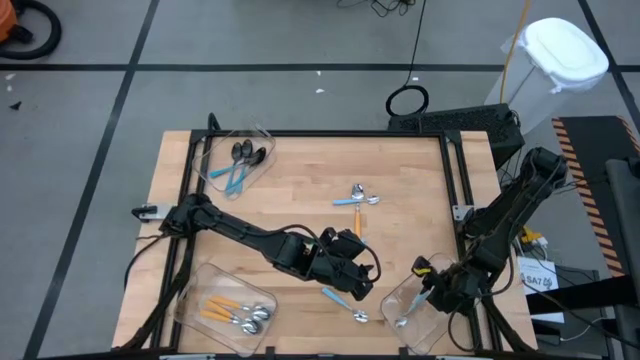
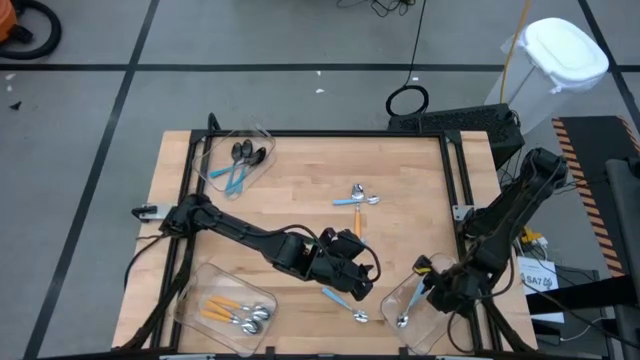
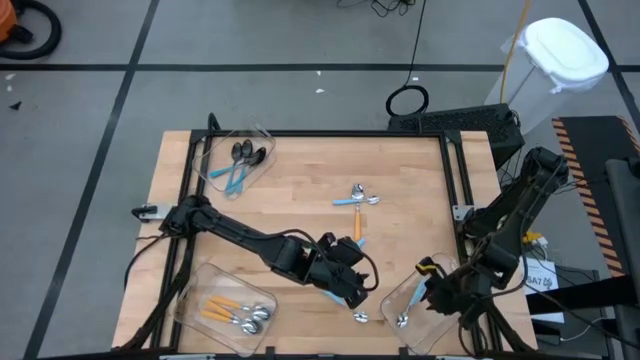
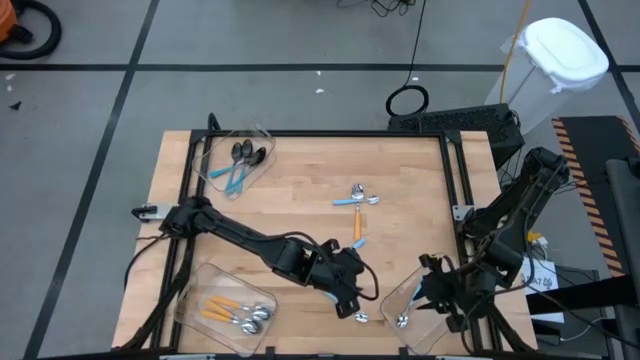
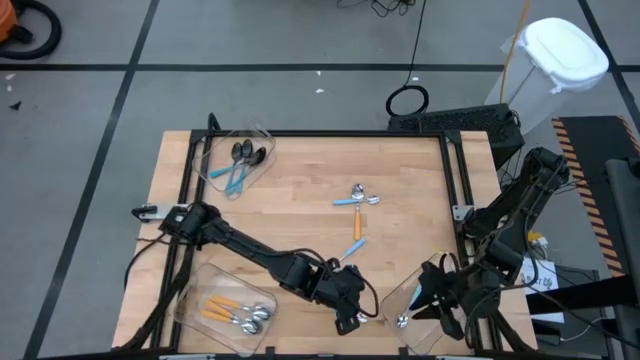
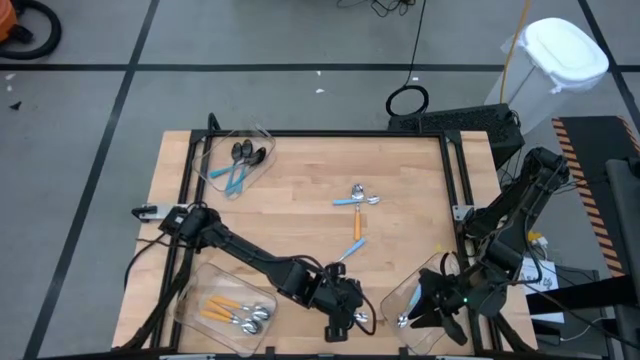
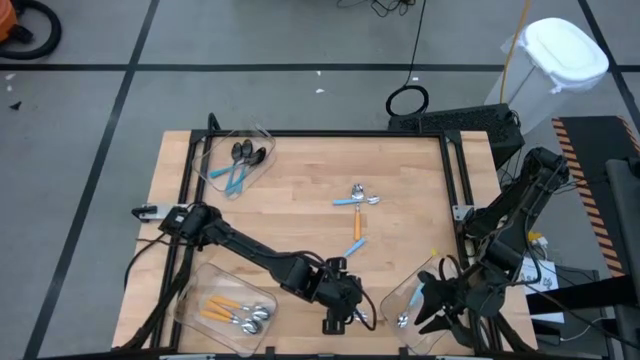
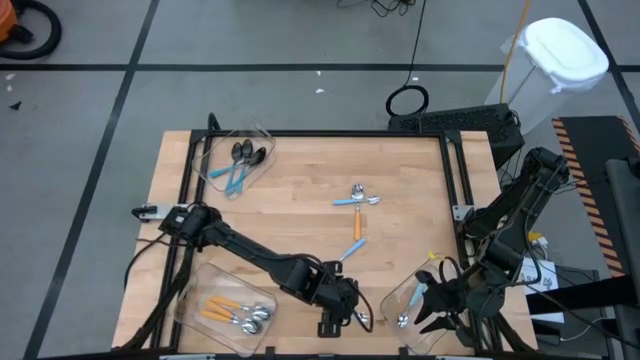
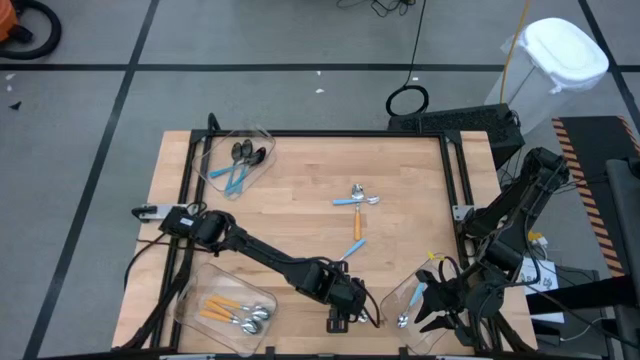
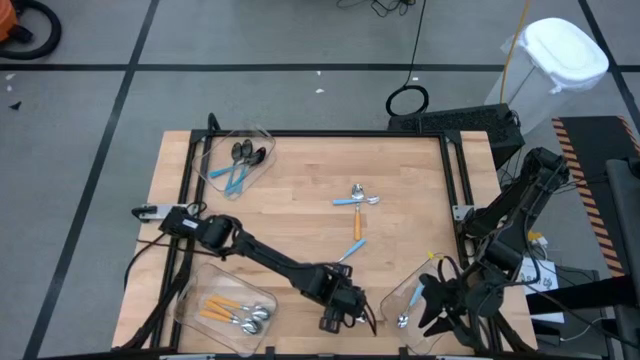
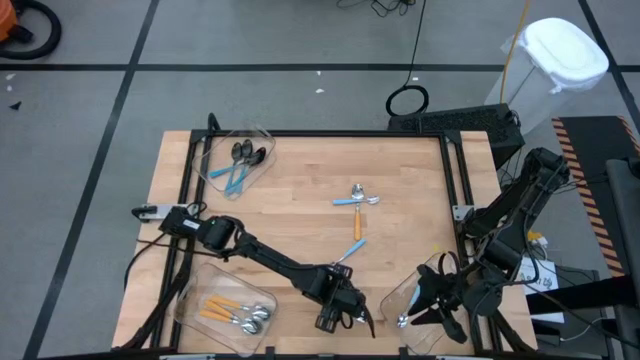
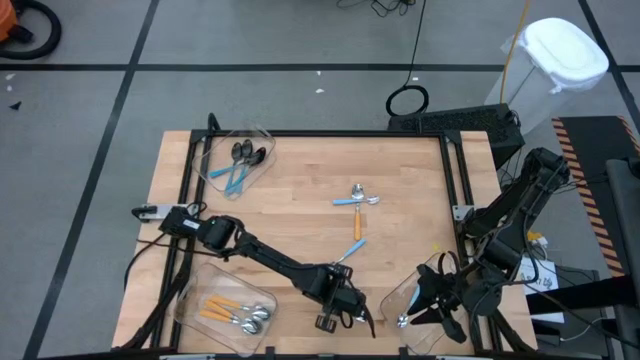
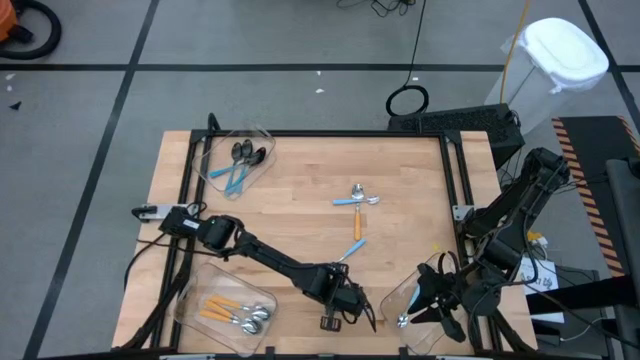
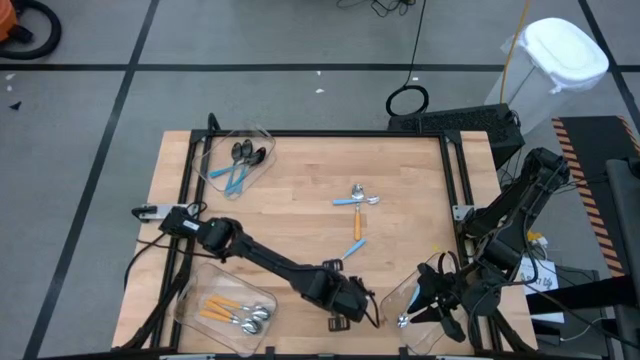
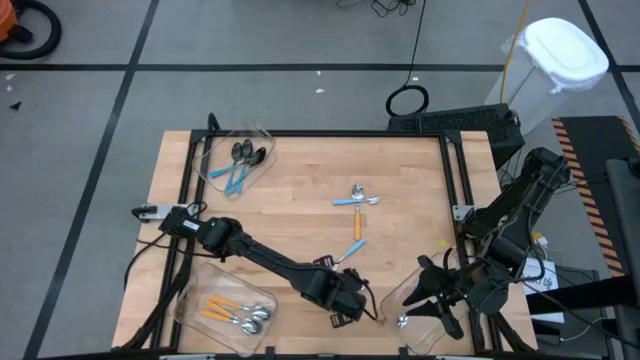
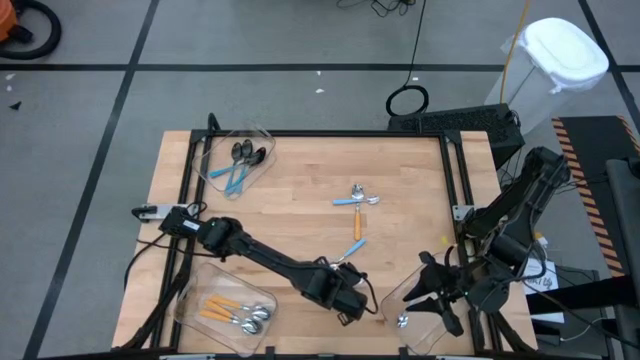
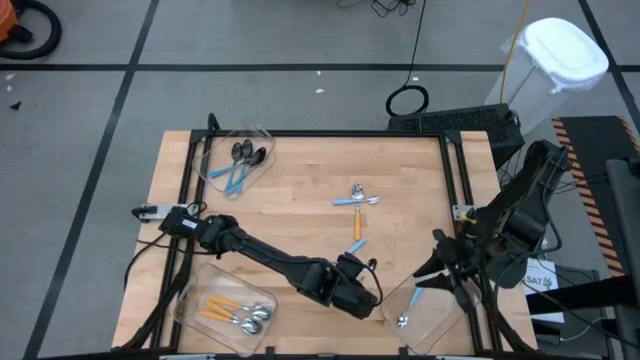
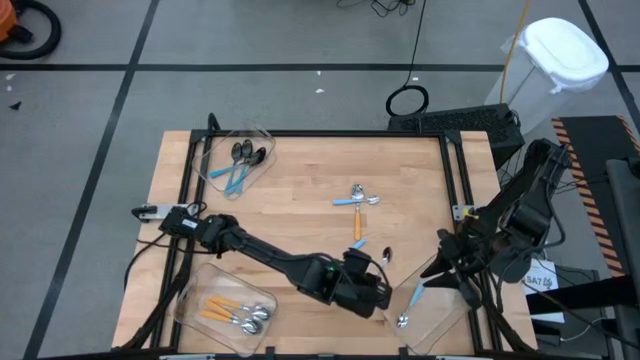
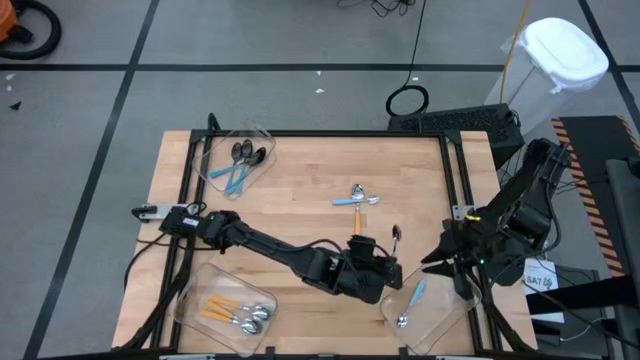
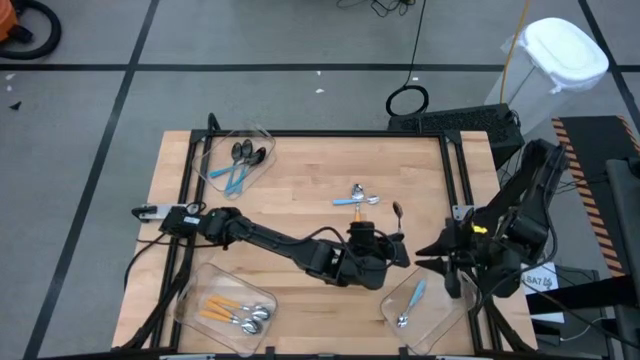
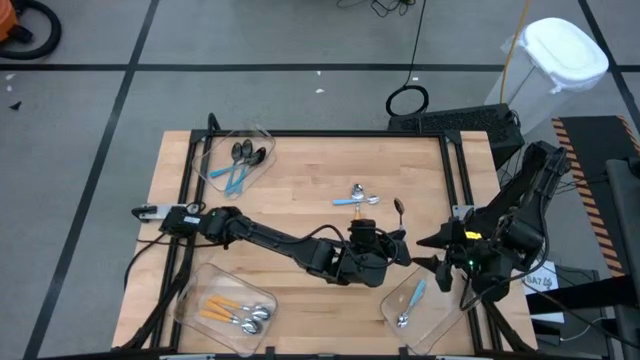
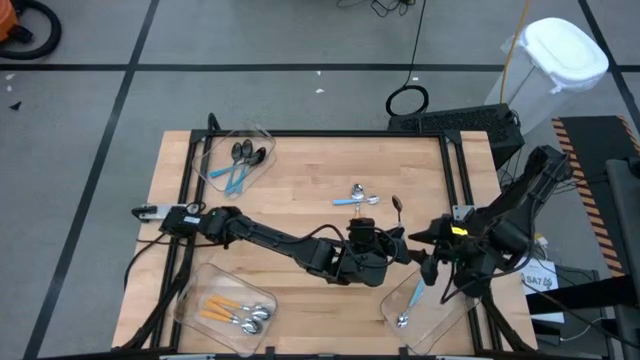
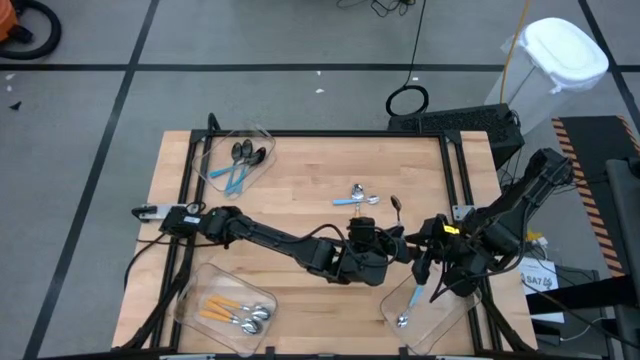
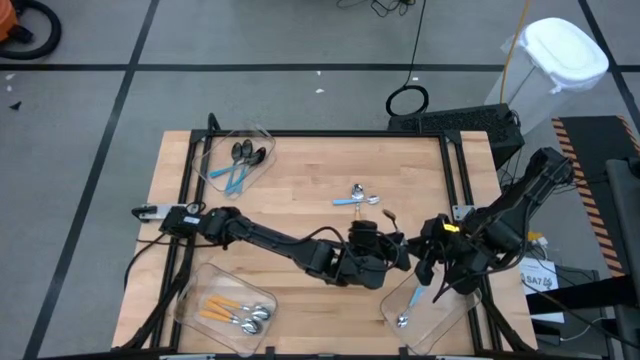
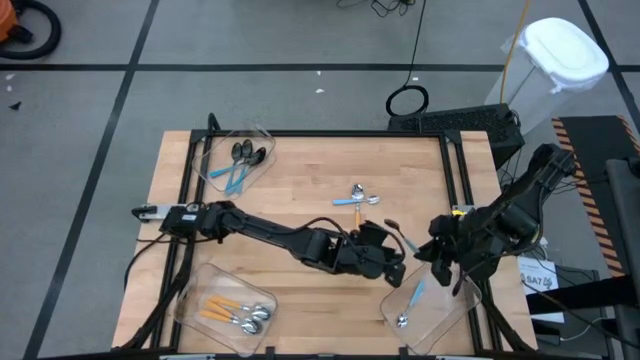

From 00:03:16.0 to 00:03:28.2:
Task: Sort silverware by color (type)
Put the light blue spoon into the bottom right transparent bin

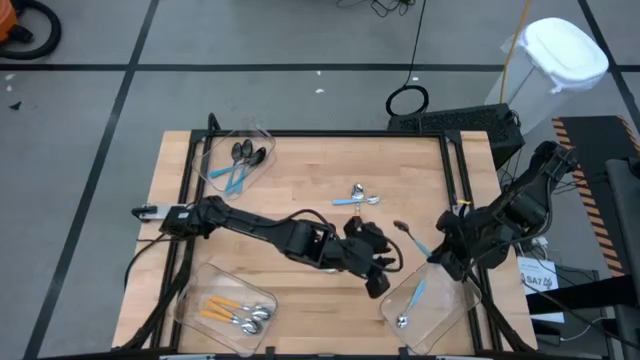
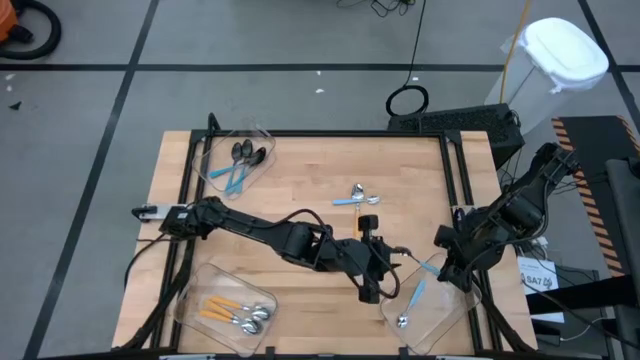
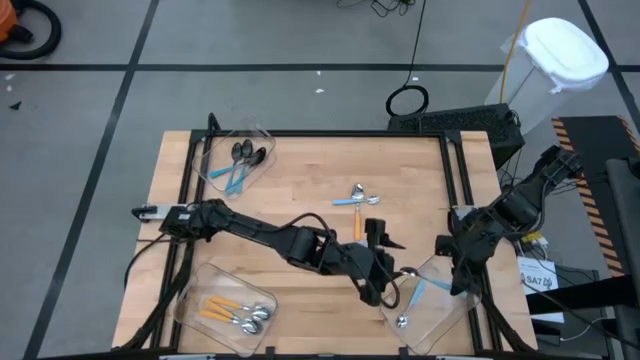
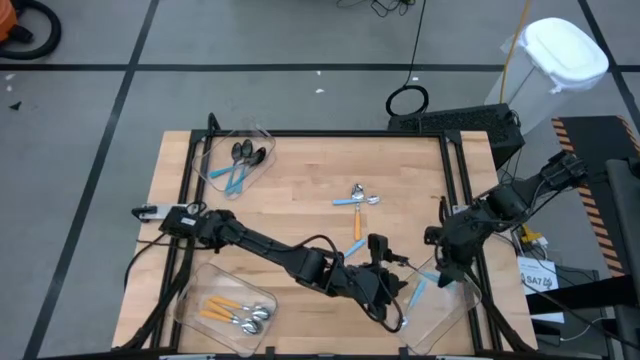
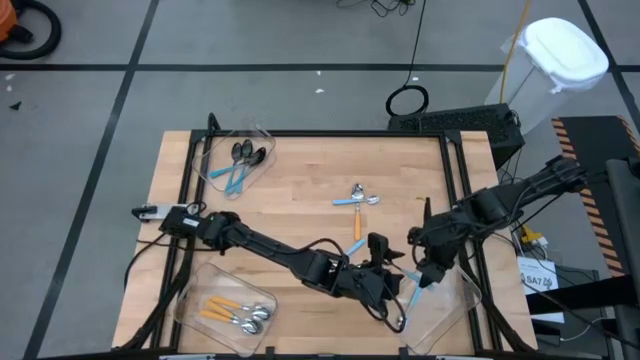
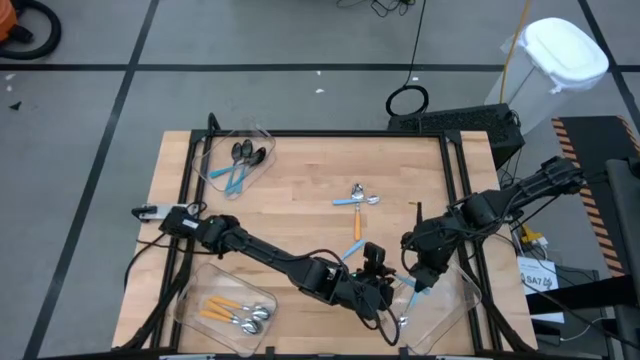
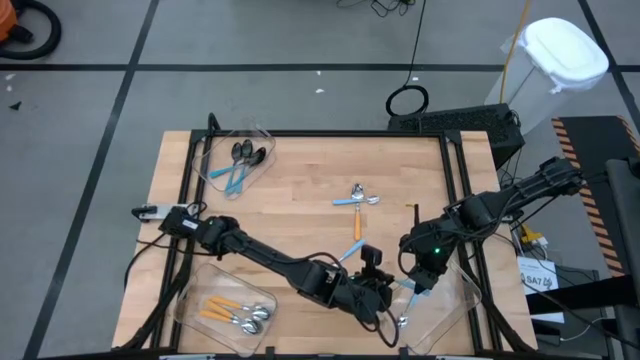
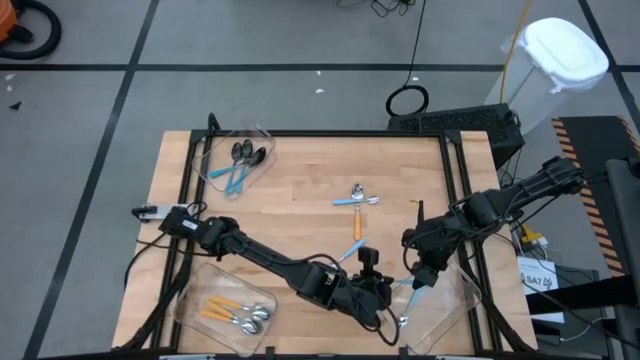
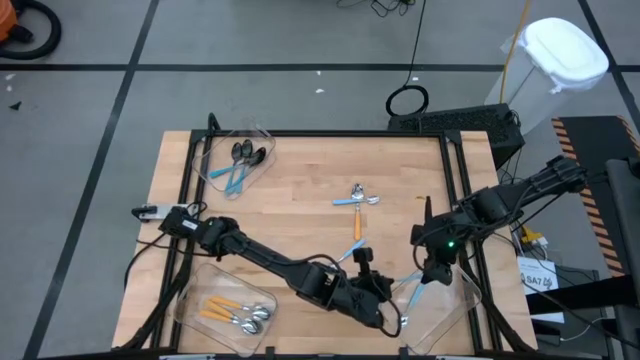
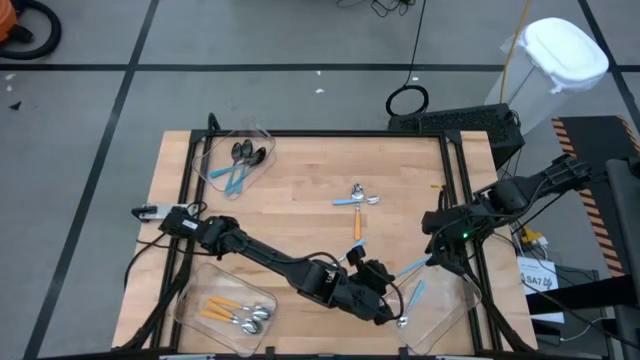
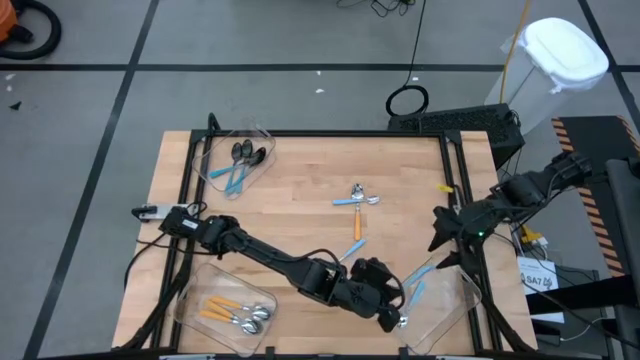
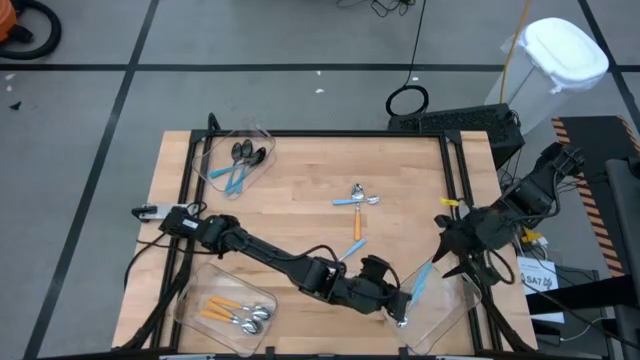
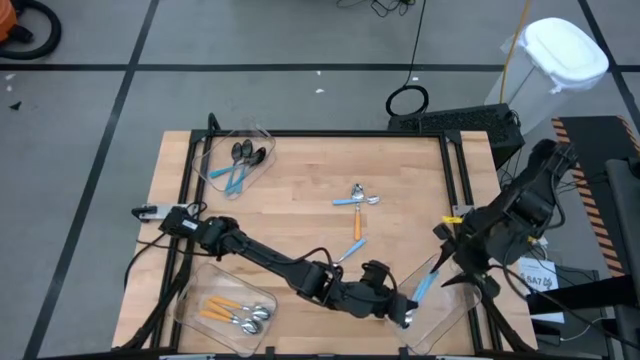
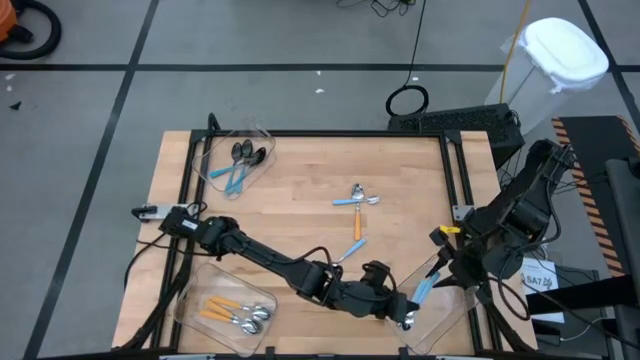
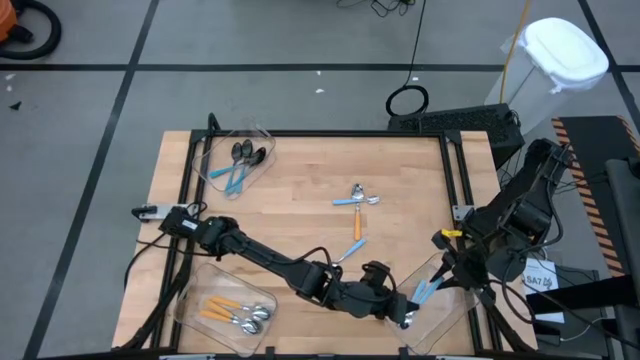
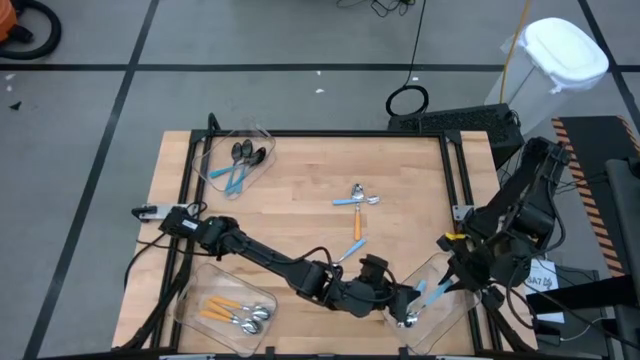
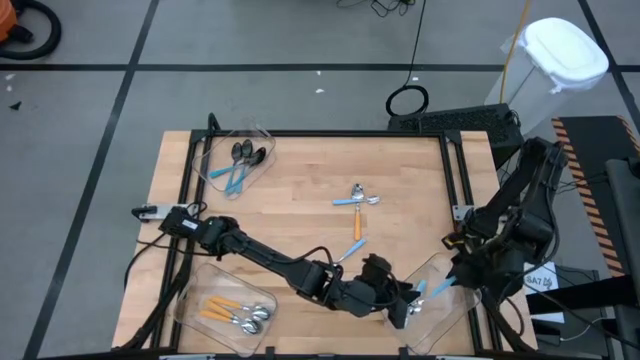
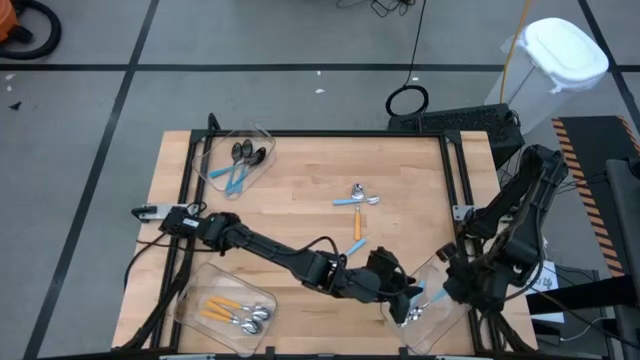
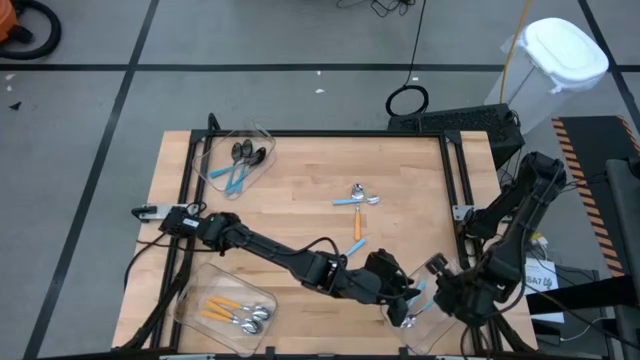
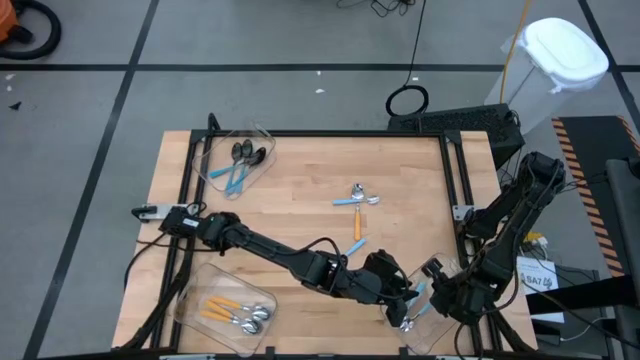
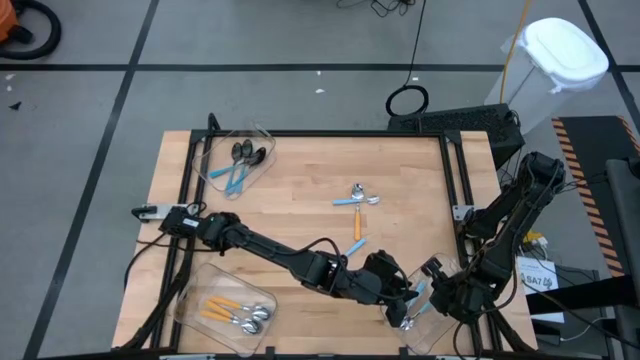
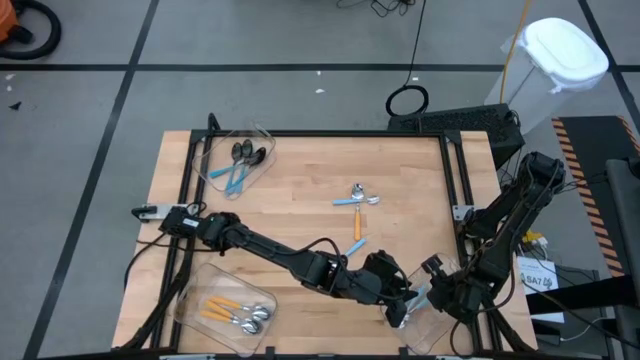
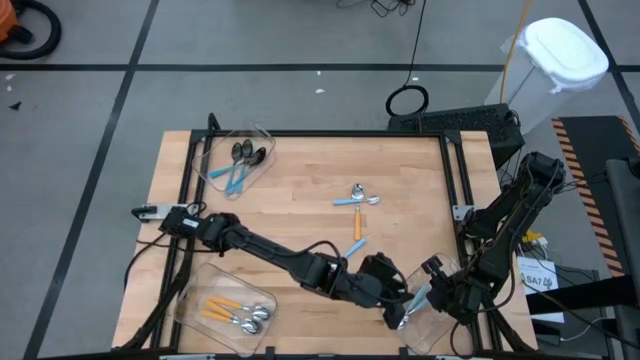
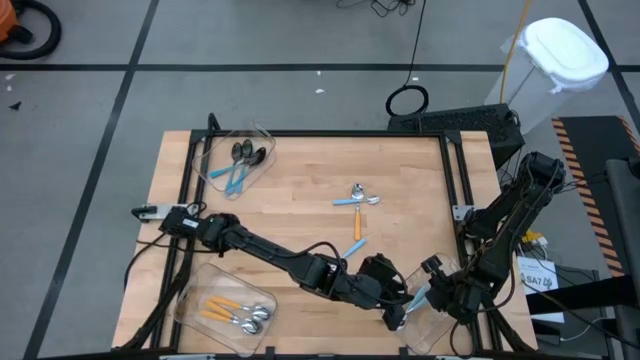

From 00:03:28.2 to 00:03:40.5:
Put the light blue spoon into the bottom right transparent bin
